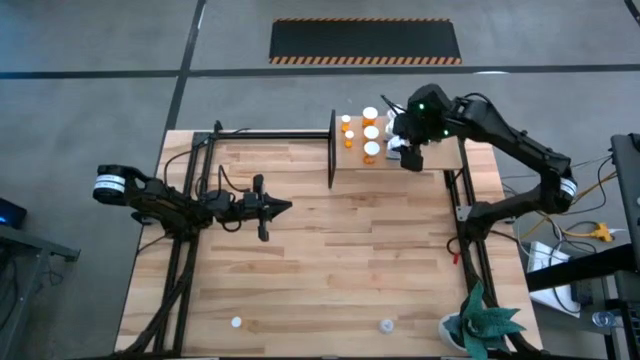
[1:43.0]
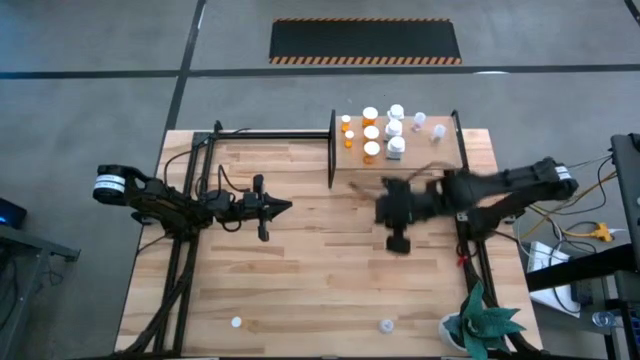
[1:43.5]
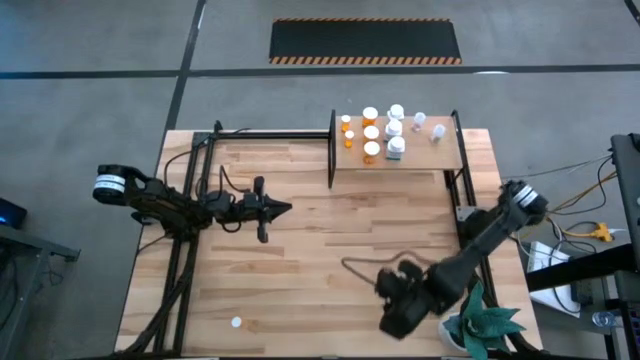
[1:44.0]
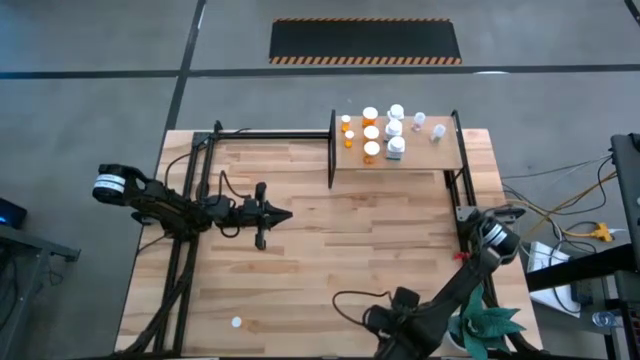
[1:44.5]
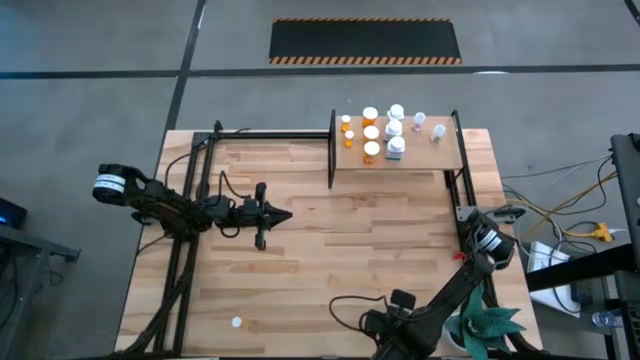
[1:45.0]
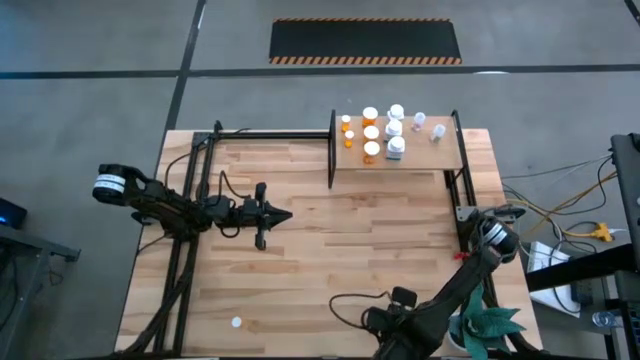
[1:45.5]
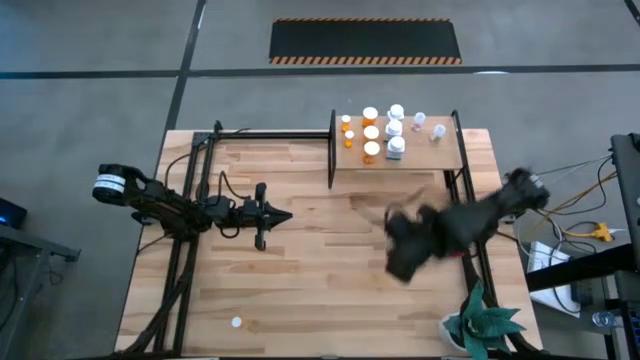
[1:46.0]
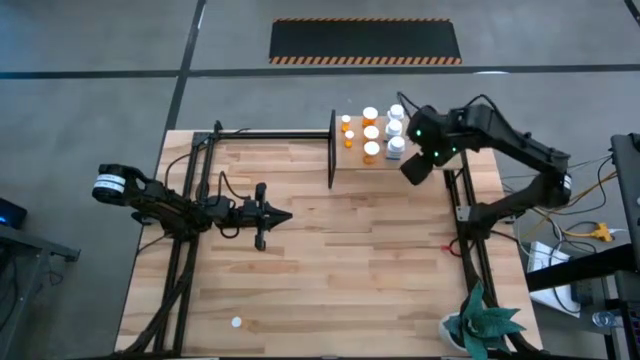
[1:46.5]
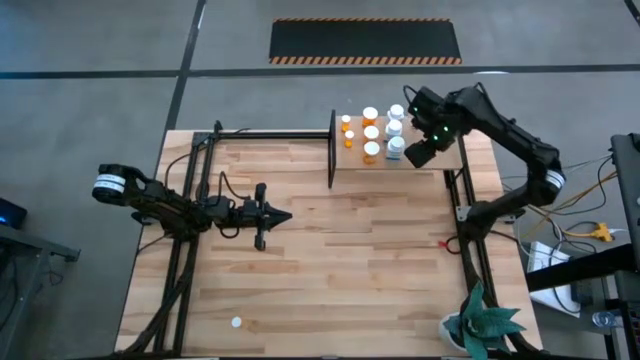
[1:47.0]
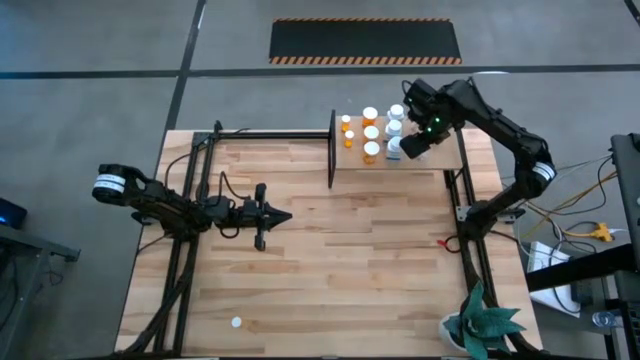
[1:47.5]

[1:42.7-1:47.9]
Task: Pick and place medicine bottles onto shelf by color
Put the transparent pill bottle on the shelf aligned with the other transparent pill bottles

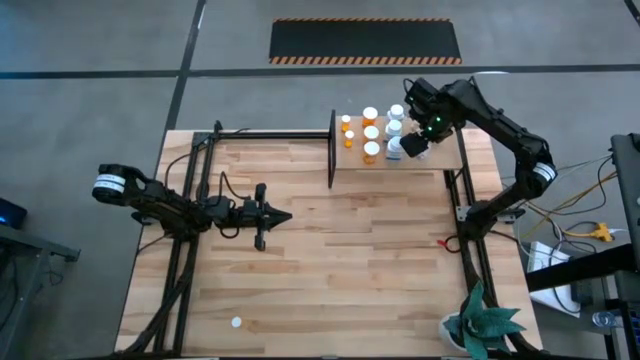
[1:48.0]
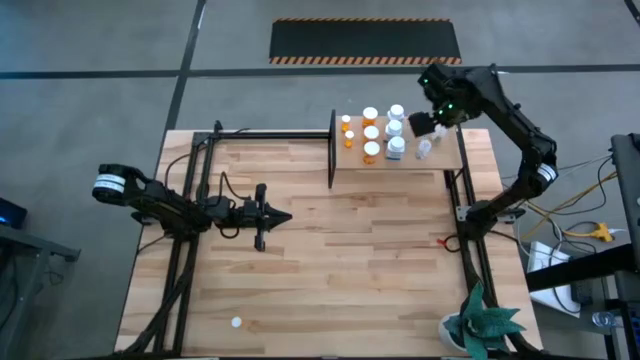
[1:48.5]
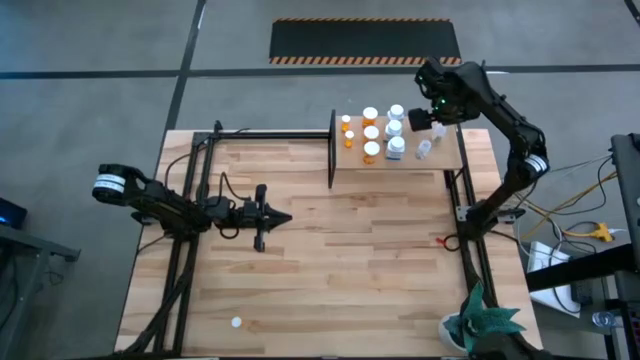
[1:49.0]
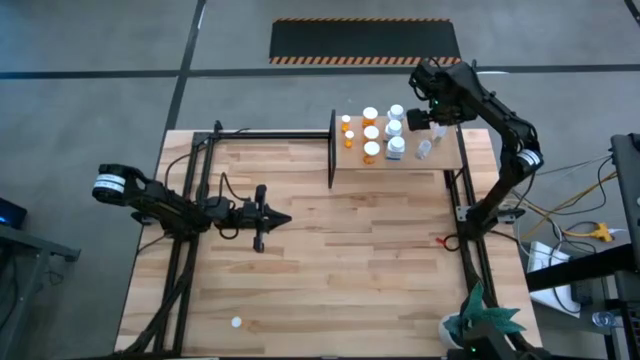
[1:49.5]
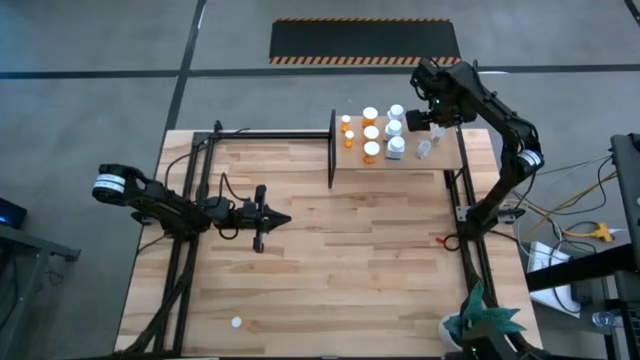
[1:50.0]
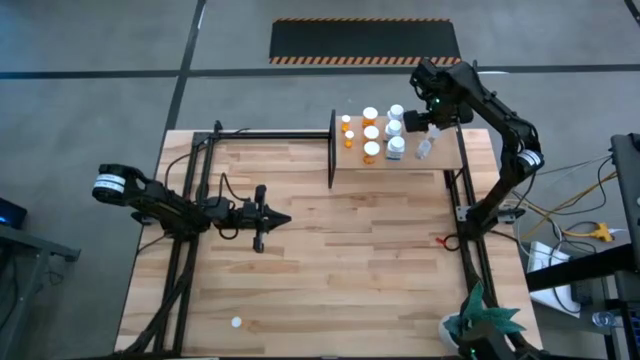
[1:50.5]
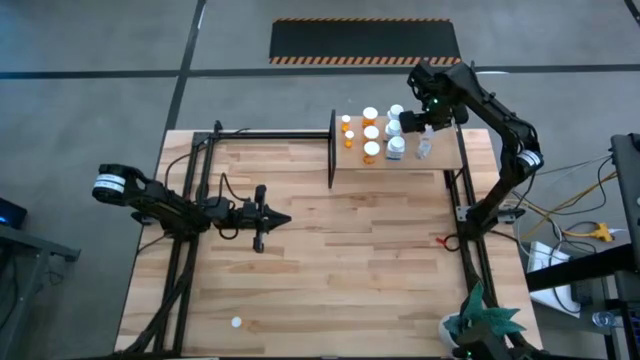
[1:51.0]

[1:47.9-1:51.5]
Adjust the transparent pill bottle on the shelf

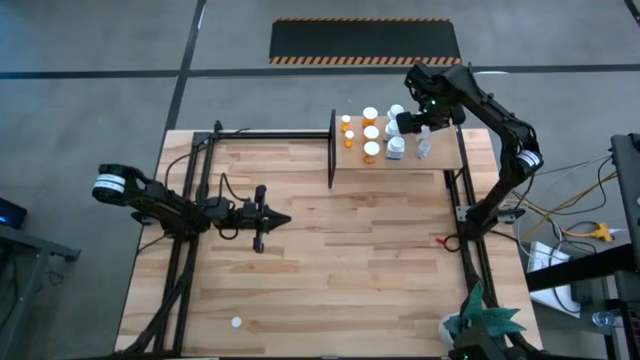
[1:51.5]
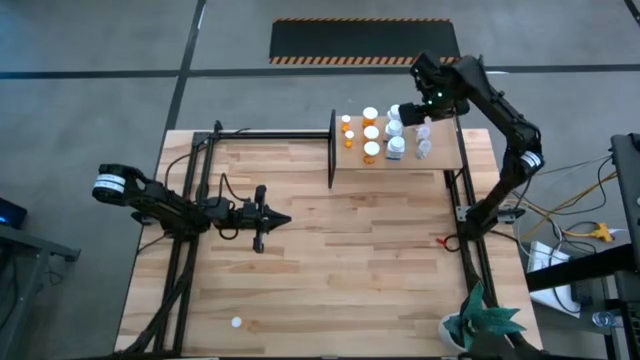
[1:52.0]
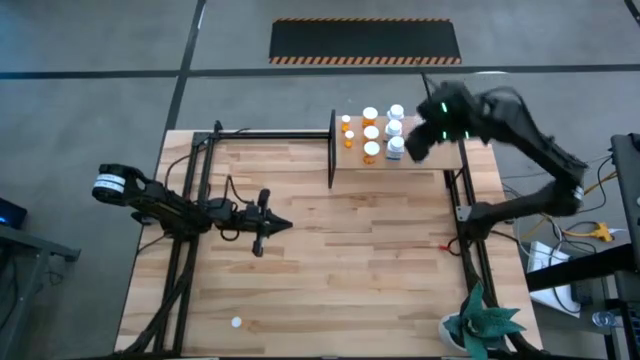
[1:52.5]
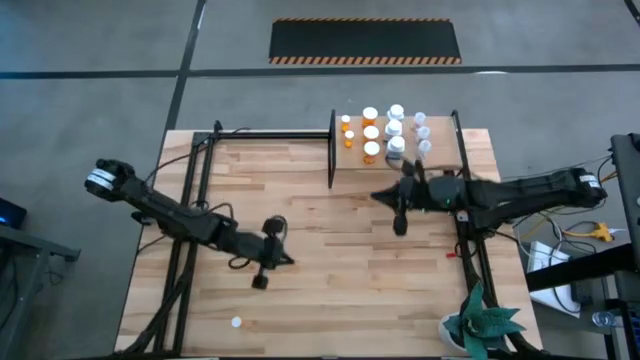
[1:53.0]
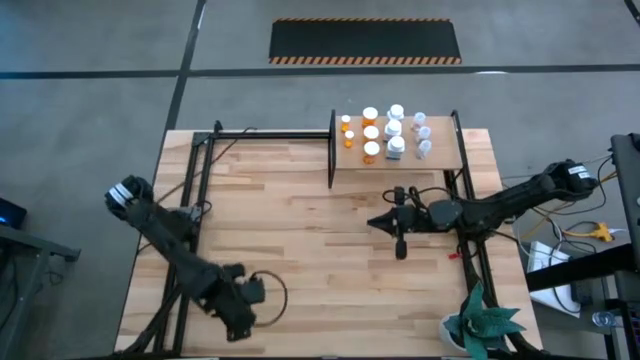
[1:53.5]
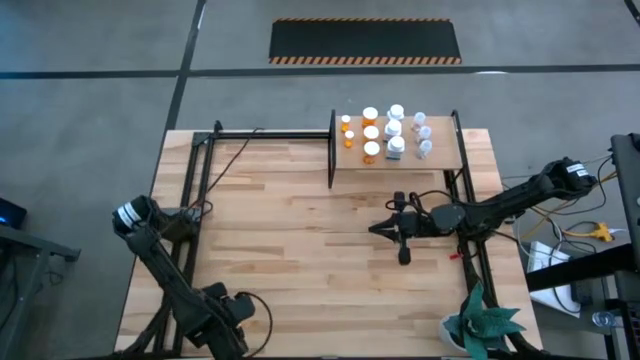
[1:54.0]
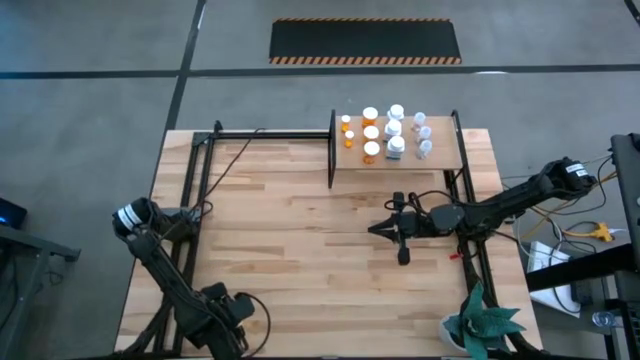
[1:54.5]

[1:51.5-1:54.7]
Put the small orange pill bottle on the shelf aligned with the other small orange pill bottles

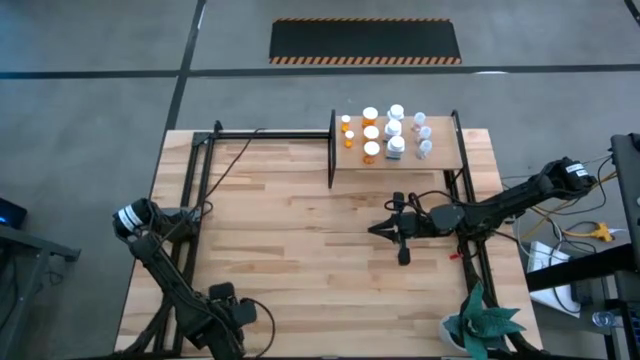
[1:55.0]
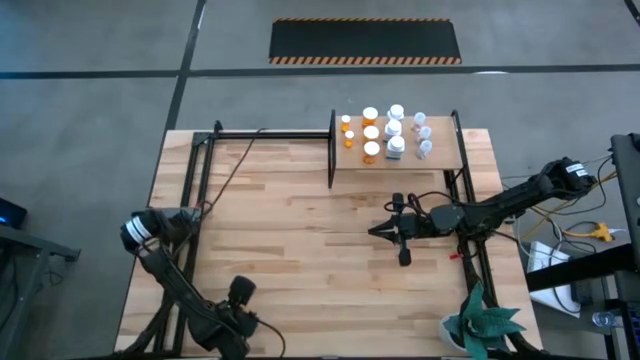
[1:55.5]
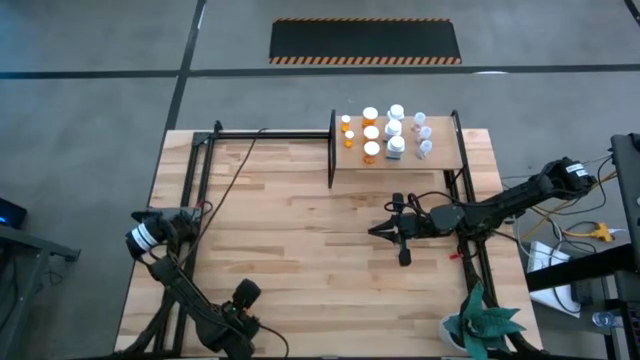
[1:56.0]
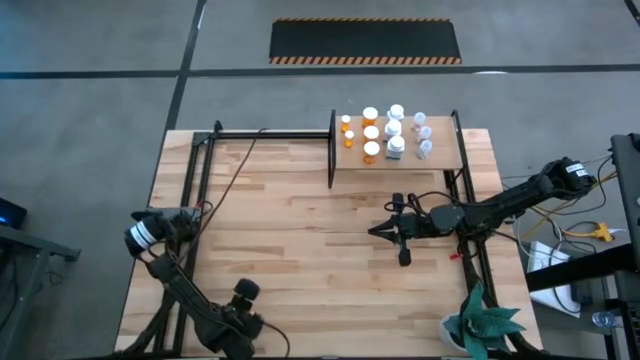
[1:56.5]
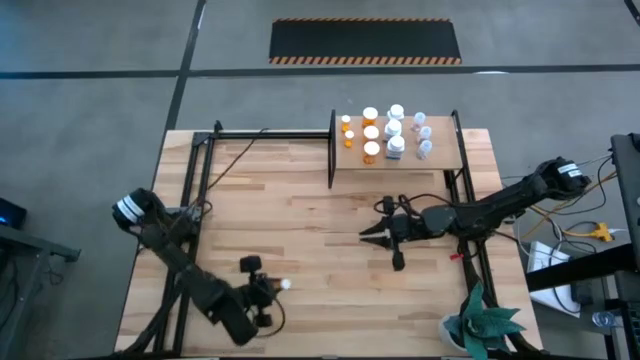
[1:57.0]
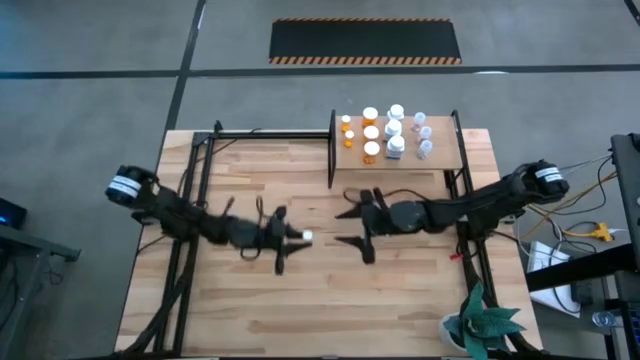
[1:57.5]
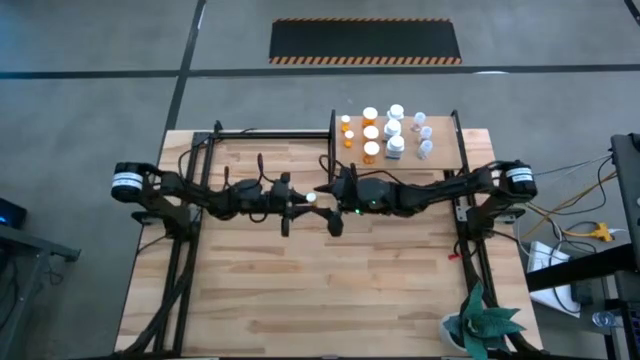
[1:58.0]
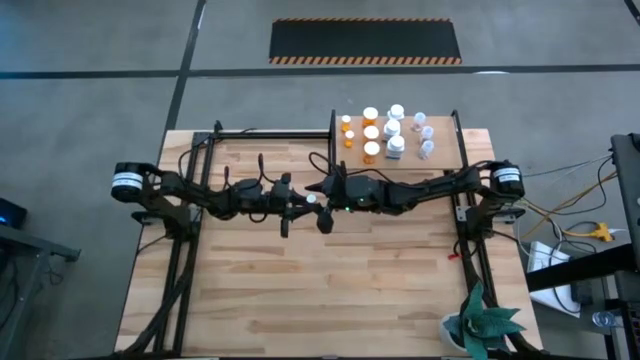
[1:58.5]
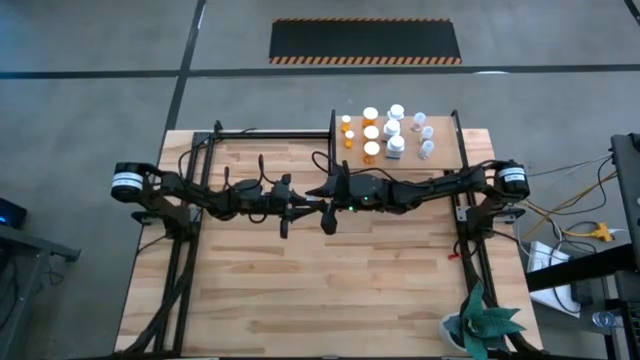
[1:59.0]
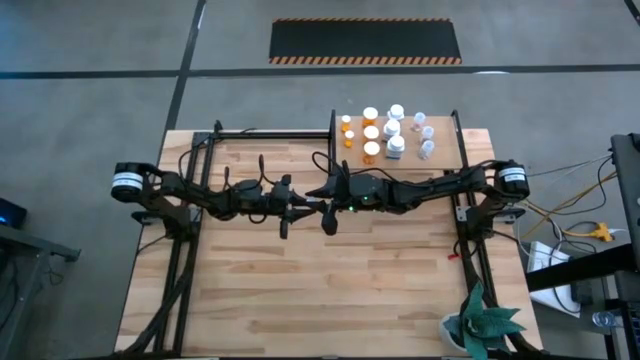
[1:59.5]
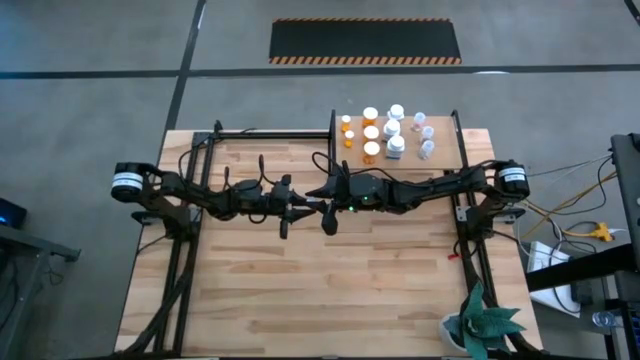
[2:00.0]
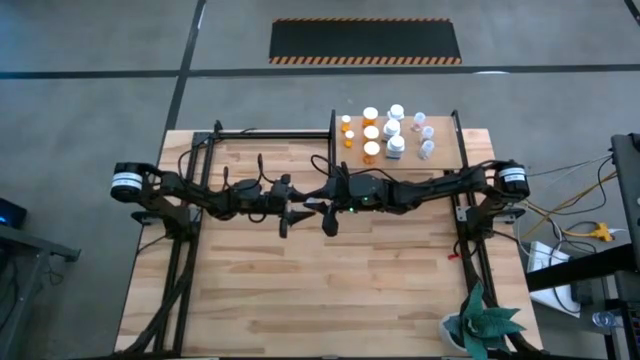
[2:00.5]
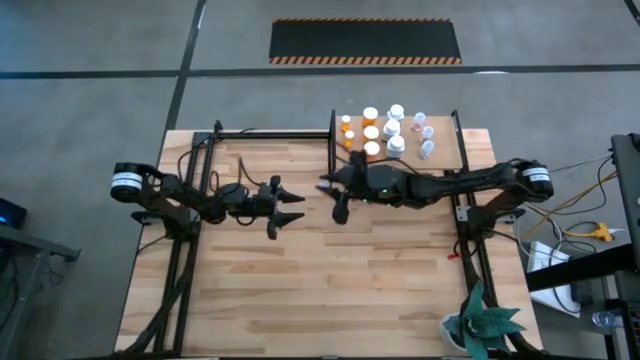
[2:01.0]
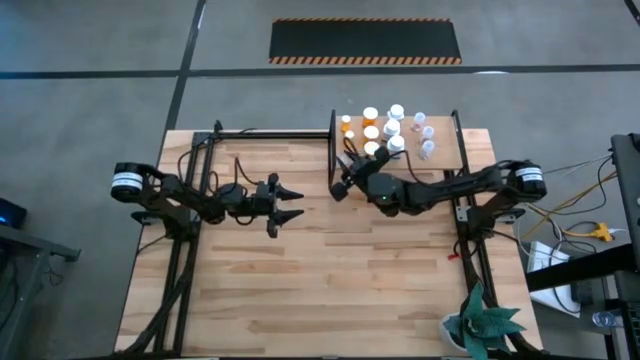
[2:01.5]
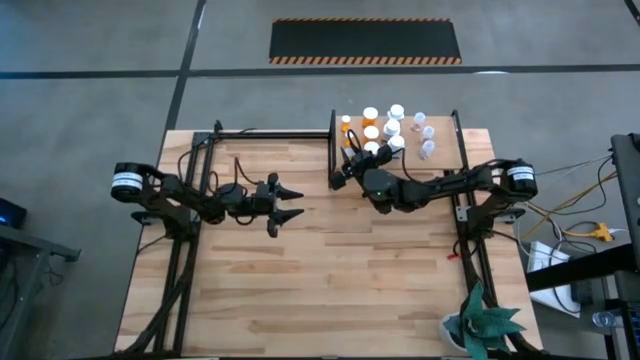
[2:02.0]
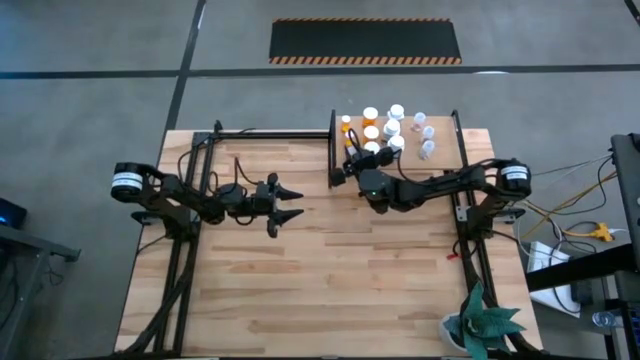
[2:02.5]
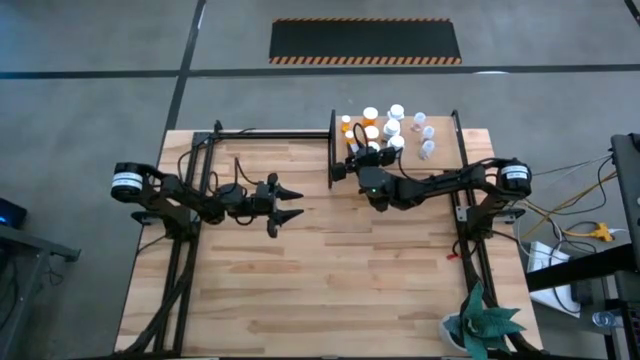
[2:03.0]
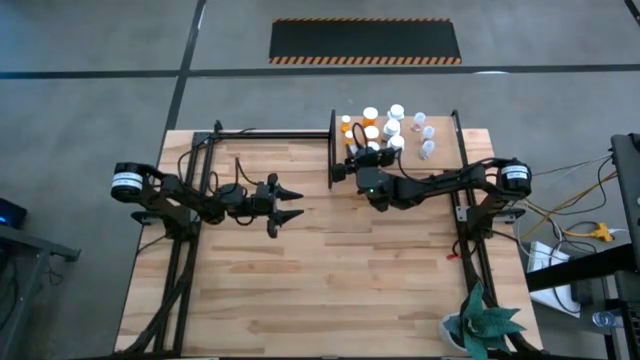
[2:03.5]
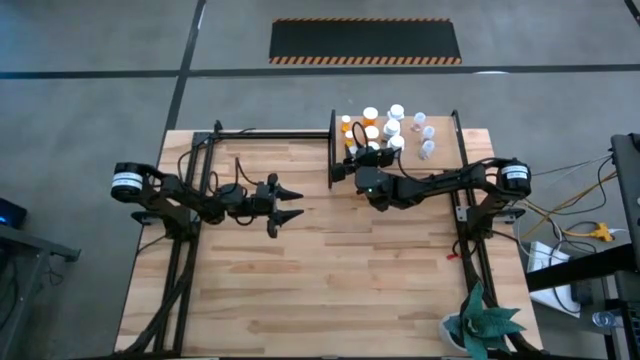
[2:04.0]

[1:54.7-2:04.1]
Put the small orange pill bottle on the shelf aligned with the other small orange pill bottles
